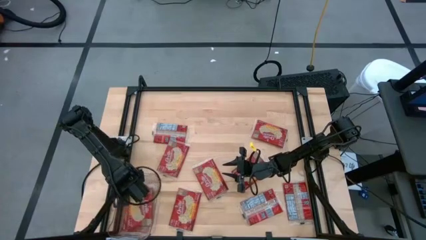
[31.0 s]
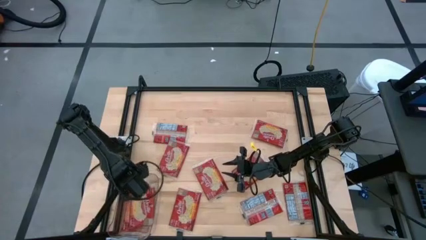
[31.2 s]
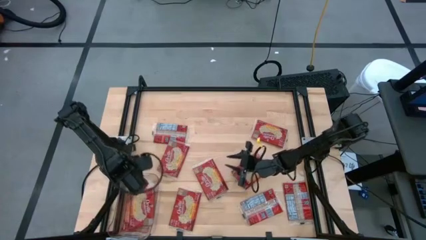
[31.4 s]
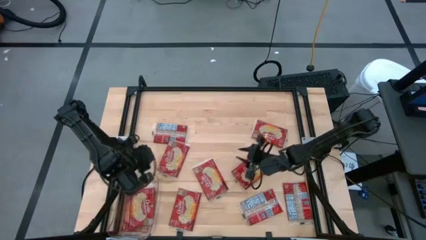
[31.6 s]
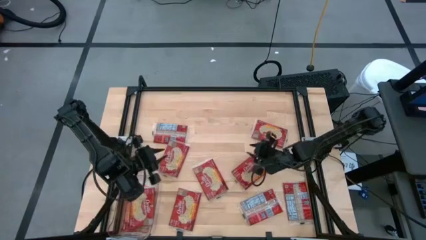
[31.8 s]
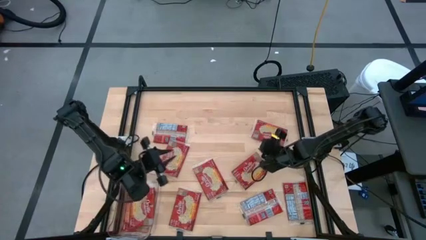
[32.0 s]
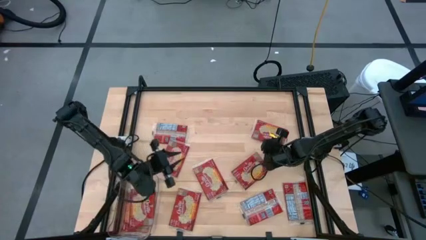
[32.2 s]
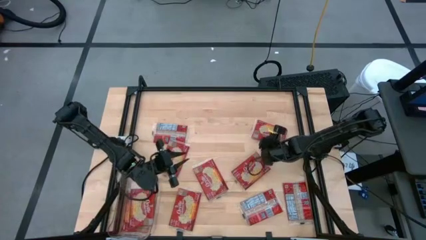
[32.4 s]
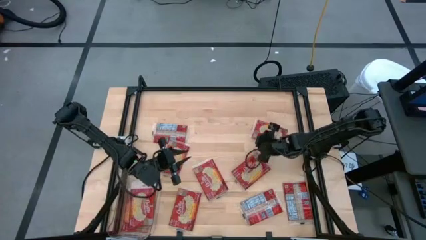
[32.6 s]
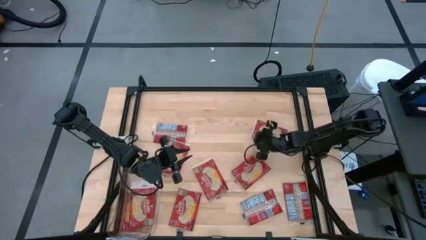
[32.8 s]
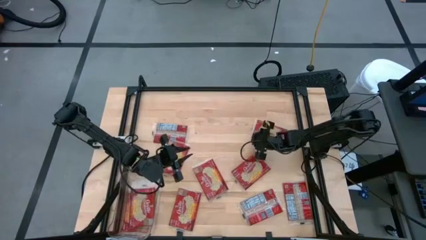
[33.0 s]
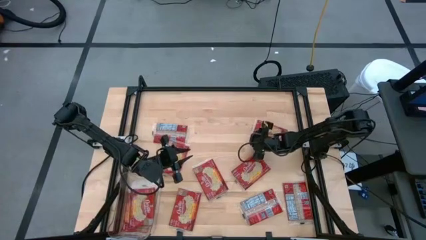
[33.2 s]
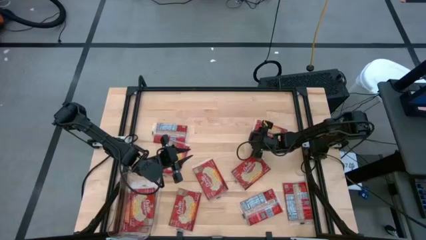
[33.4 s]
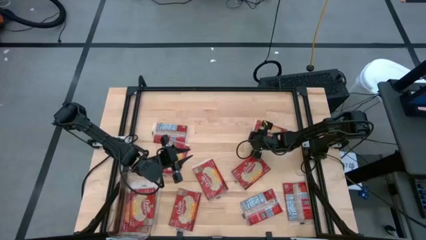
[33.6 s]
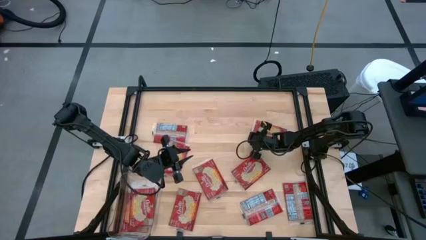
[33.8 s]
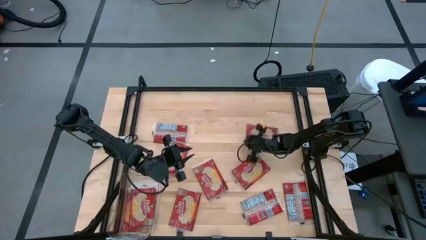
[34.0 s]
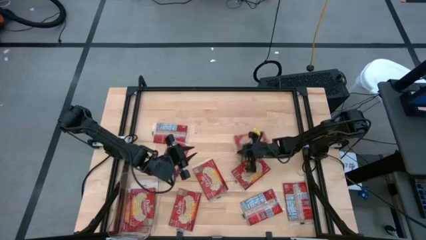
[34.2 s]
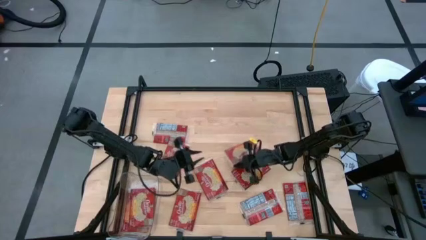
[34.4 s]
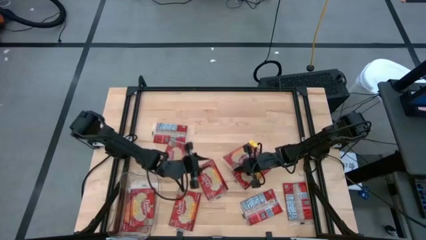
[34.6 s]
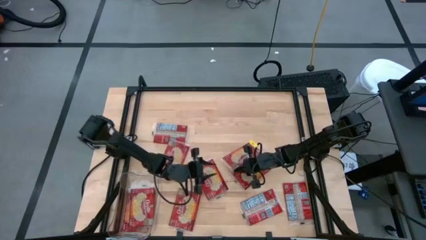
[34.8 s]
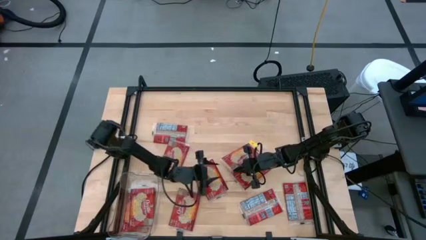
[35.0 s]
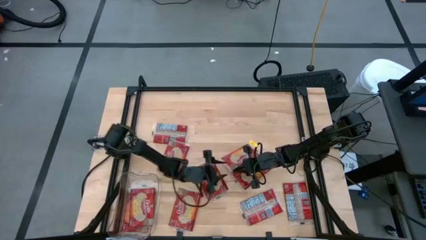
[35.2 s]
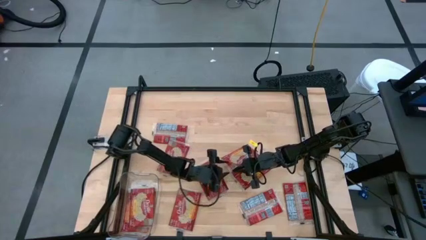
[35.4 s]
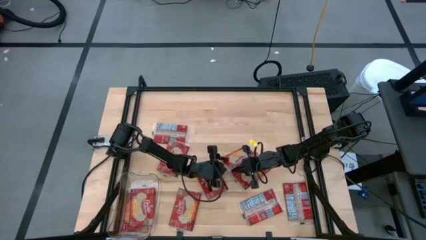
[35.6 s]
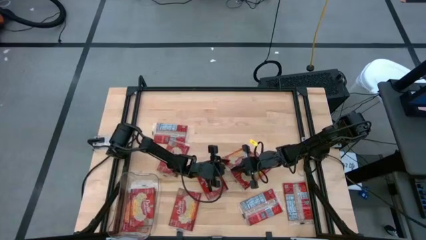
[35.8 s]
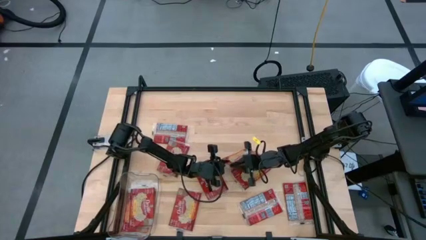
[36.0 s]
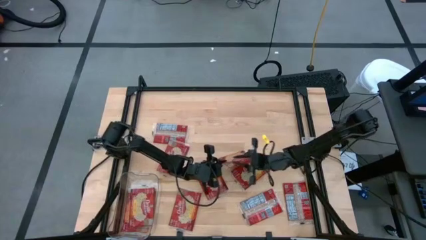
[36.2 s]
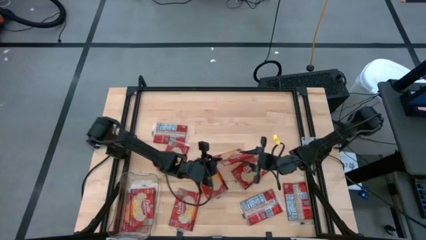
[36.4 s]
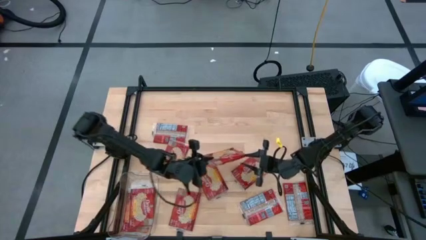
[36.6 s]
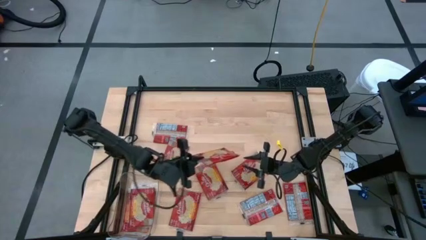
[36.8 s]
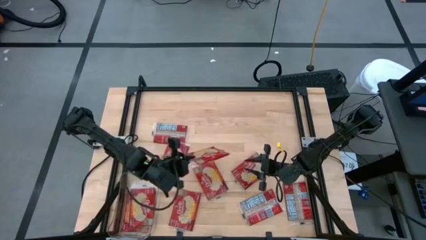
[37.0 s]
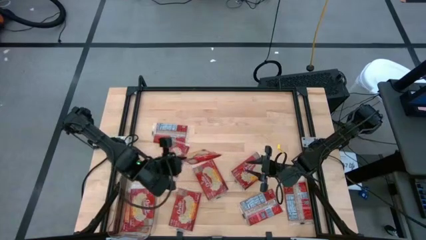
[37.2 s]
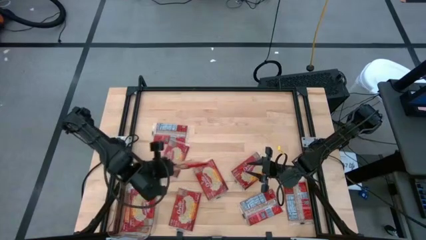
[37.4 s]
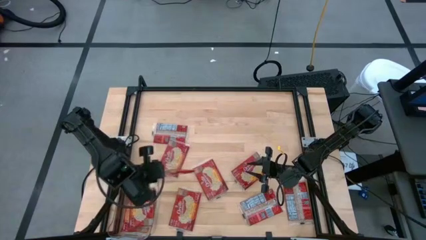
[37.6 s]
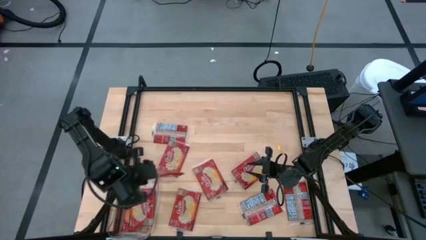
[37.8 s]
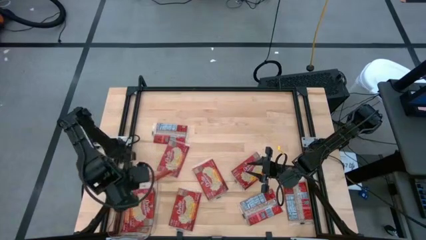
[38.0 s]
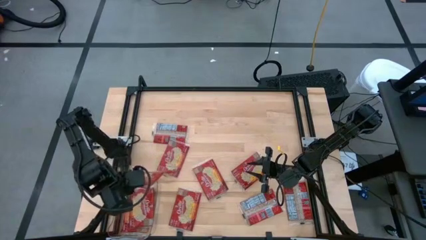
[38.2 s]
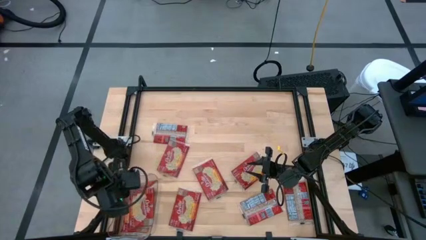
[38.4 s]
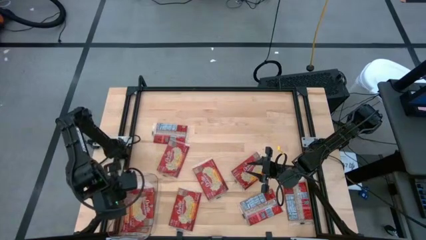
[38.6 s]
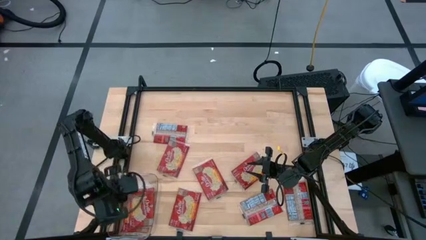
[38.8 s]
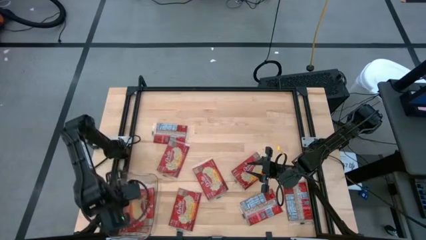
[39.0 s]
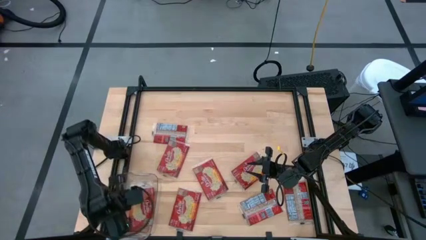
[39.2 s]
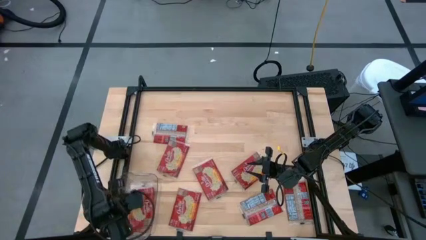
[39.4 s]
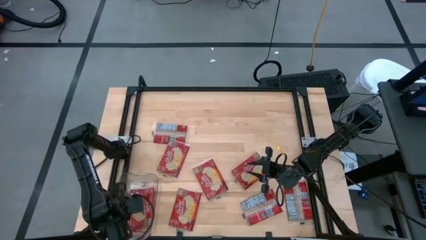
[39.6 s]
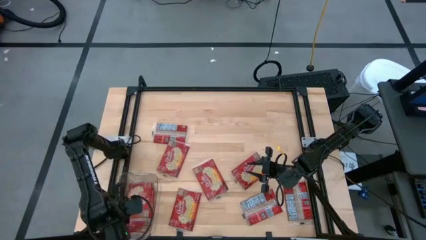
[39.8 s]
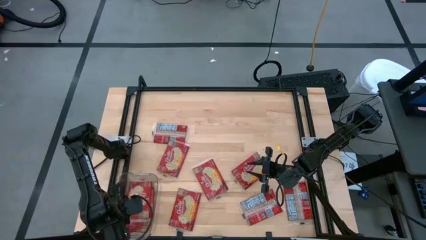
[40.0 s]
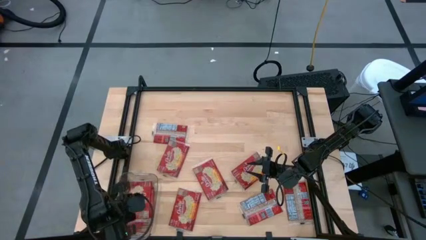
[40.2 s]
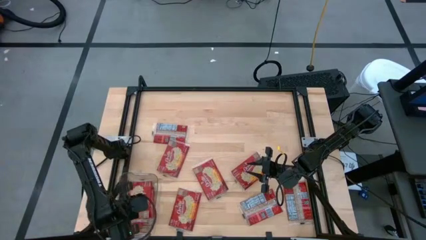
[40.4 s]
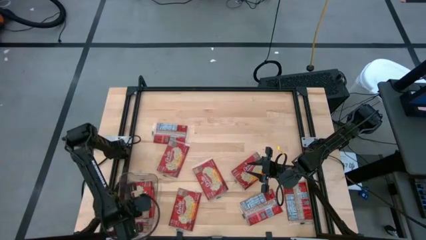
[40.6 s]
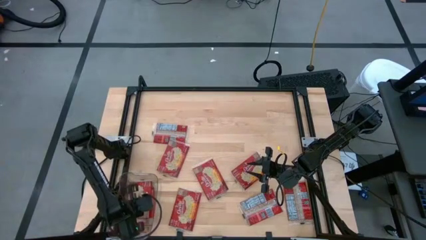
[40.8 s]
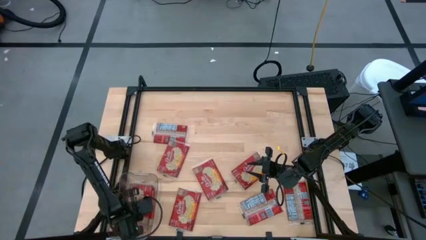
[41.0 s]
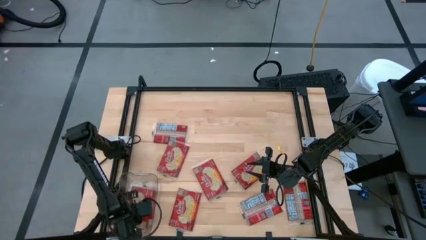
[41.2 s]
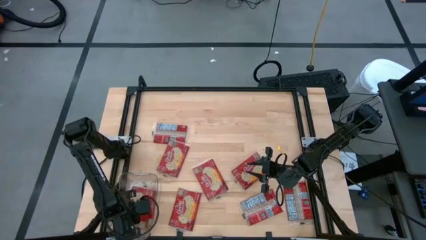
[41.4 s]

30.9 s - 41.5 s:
Task: Sort popcorn bags into baskets
Put the popcorn bag into the transparent bin

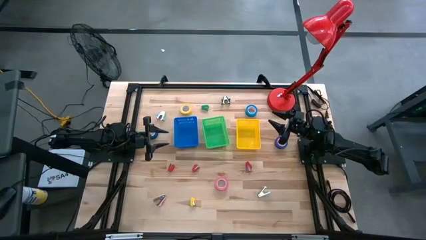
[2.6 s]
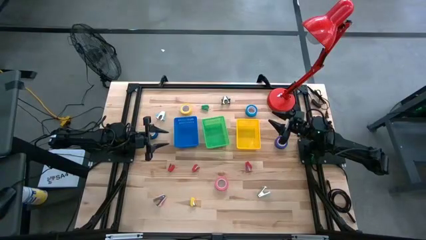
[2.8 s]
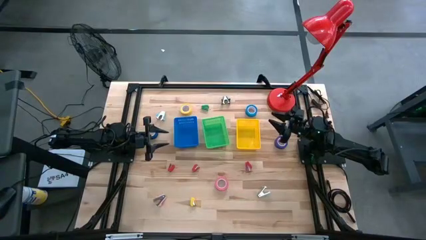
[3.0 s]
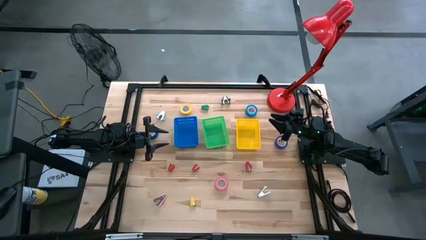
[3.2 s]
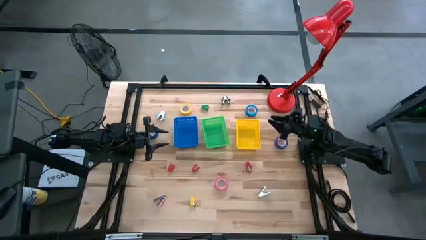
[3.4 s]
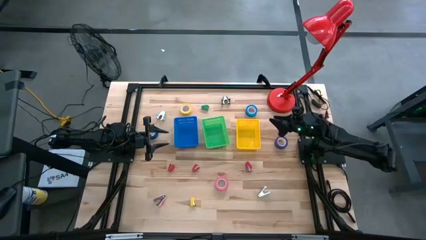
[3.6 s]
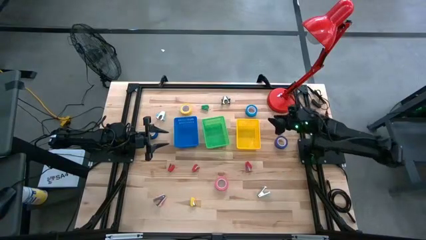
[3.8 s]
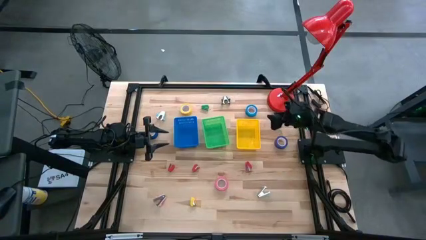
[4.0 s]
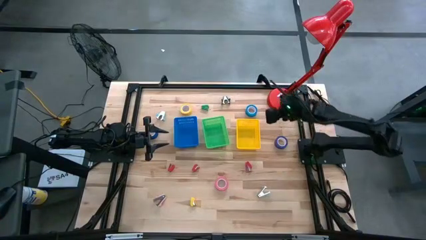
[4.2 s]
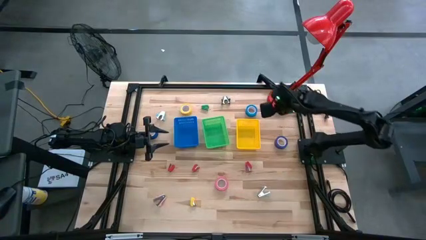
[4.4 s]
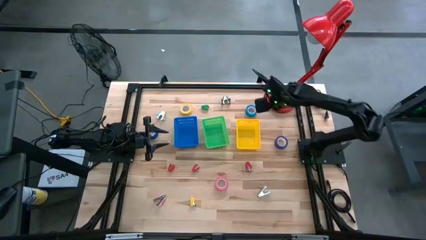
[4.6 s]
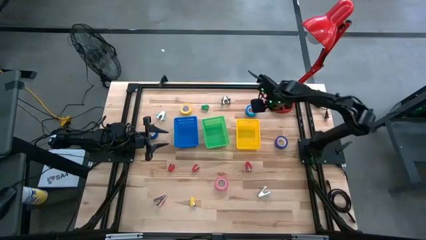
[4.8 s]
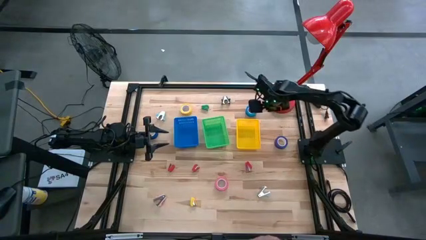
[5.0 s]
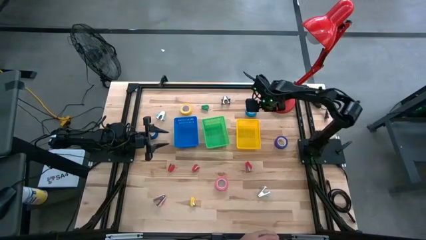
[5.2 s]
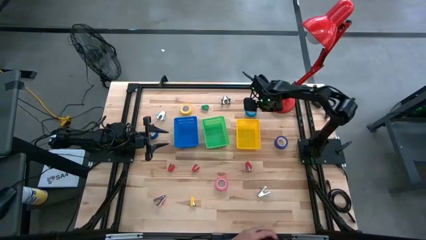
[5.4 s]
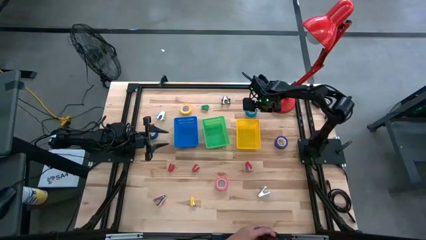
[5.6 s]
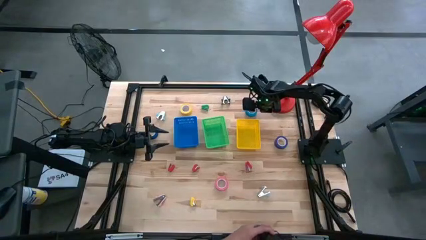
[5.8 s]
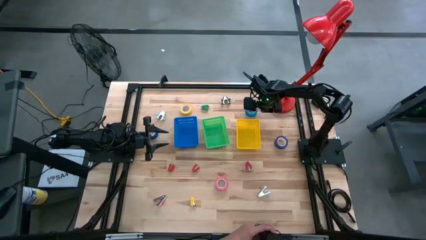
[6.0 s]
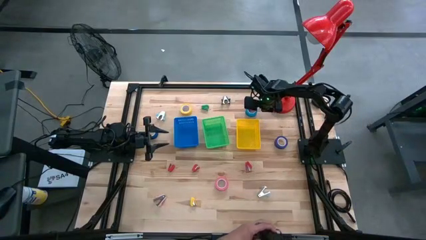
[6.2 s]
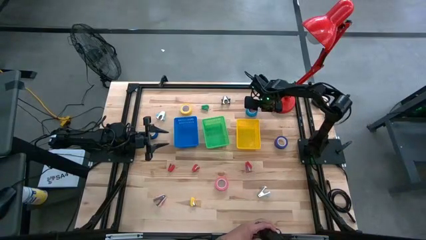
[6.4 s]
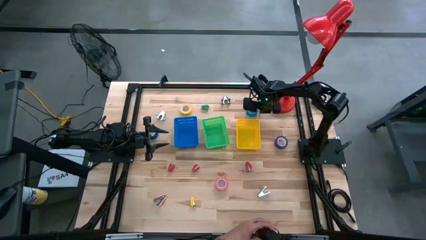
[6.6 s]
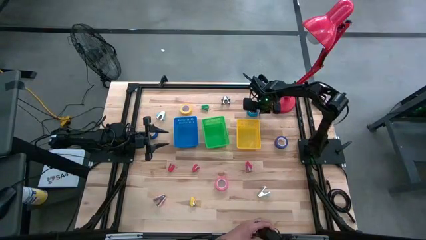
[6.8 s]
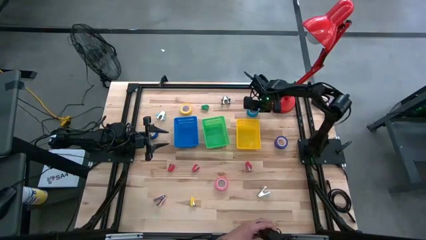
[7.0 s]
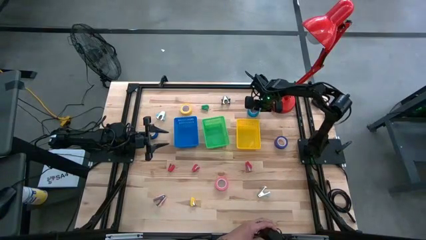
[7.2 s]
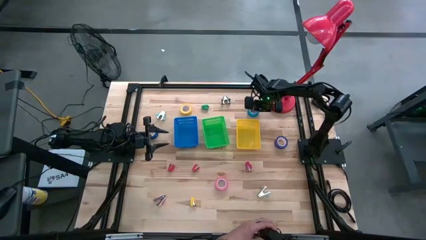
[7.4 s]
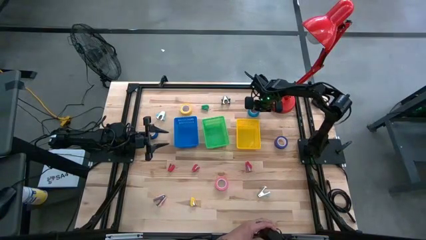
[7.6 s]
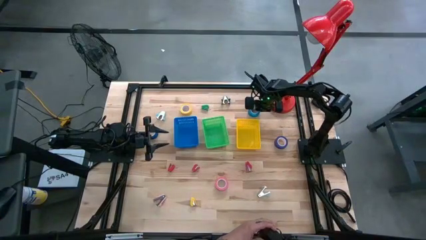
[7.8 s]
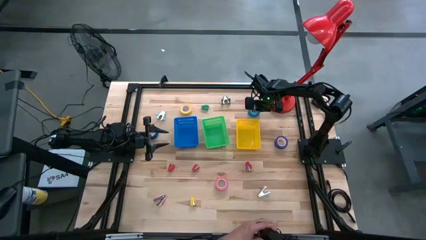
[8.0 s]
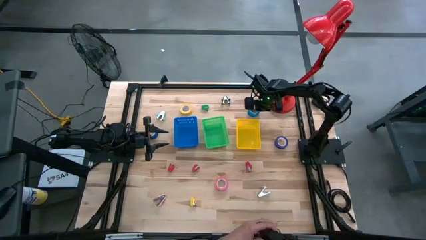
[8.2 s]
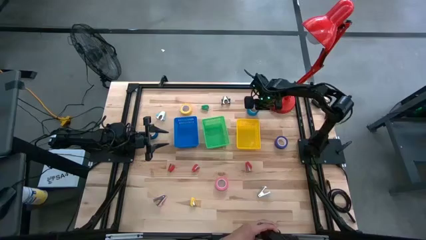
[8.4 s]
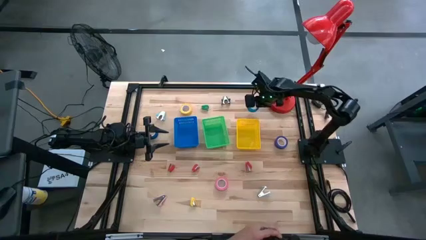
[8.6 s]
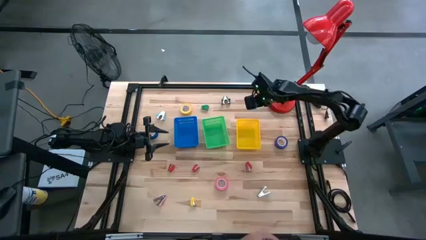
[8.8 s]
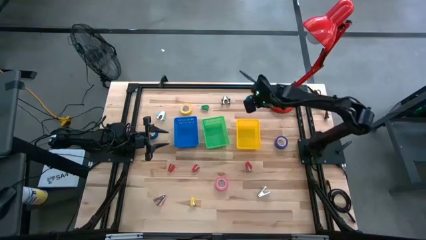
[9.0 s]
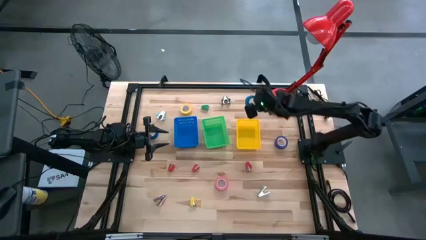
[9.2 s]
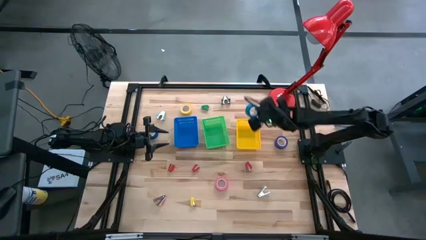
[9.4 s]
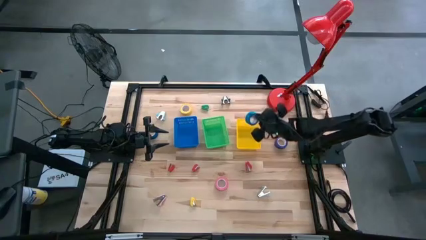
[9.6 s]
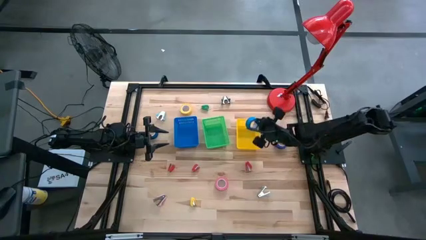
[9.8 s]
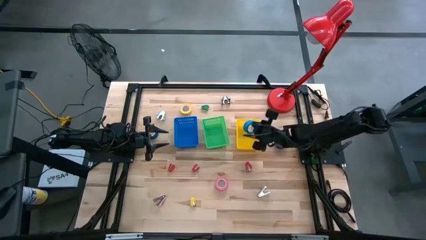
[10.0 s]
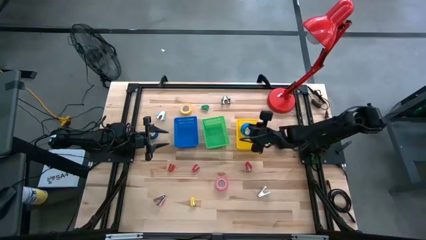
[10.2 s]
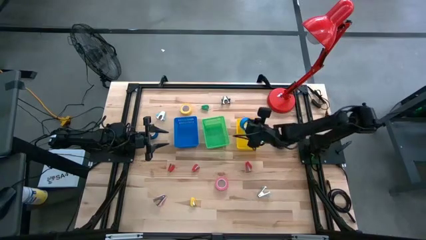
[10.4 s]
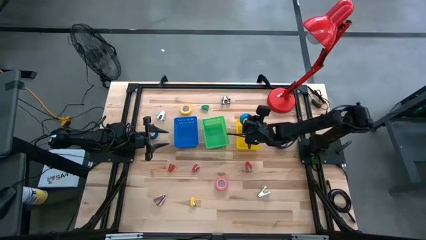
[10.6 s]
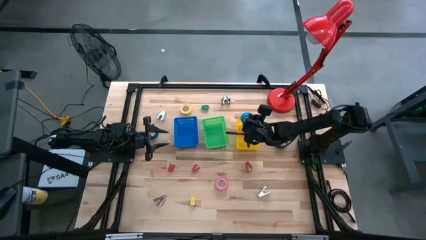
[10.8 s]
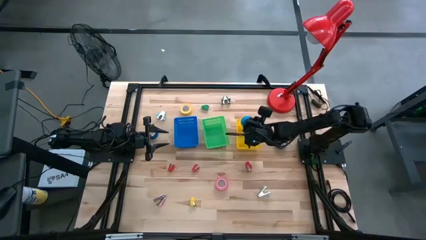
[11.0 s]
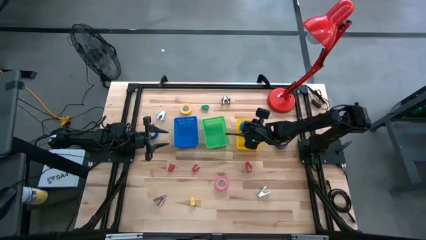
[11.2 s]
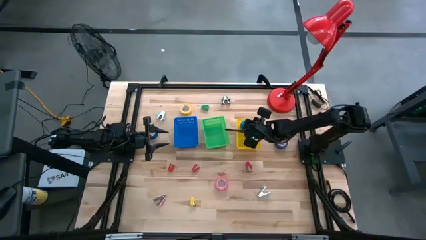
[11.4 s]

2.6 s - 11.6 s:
Task: Pick and place Stapler, Stapler remover, tape
Put the blue tape into the yellow bin
